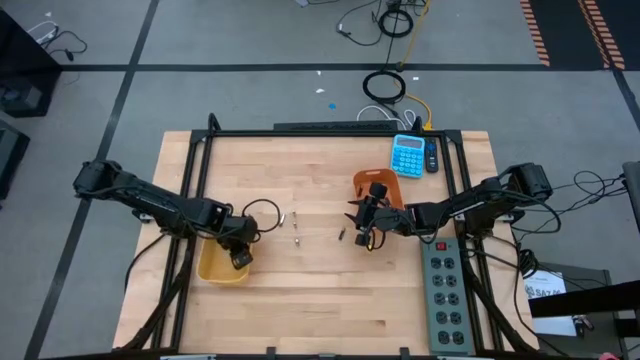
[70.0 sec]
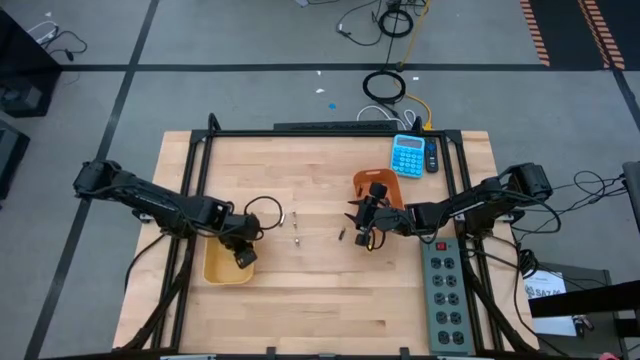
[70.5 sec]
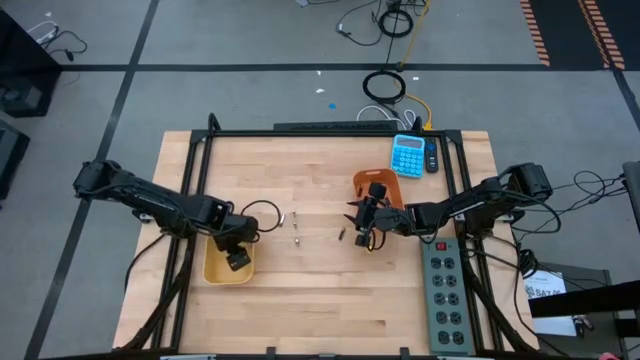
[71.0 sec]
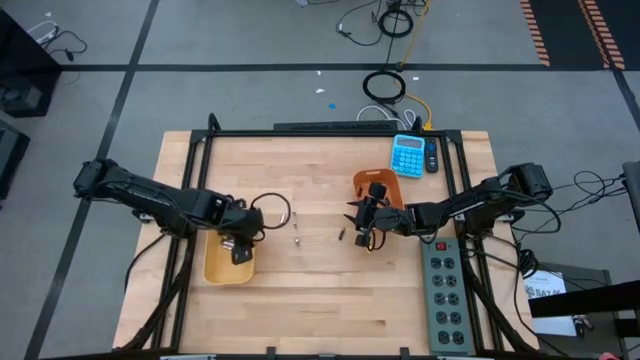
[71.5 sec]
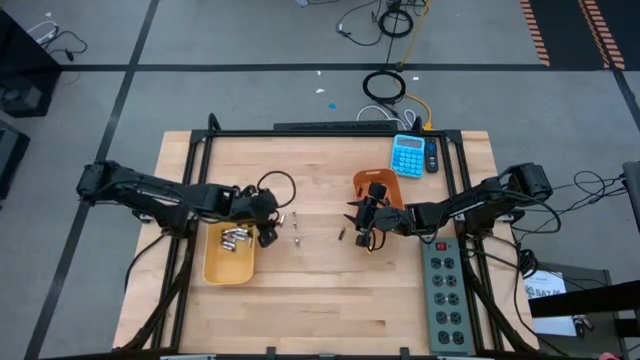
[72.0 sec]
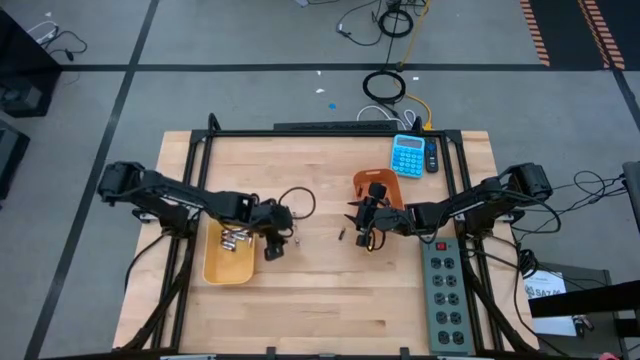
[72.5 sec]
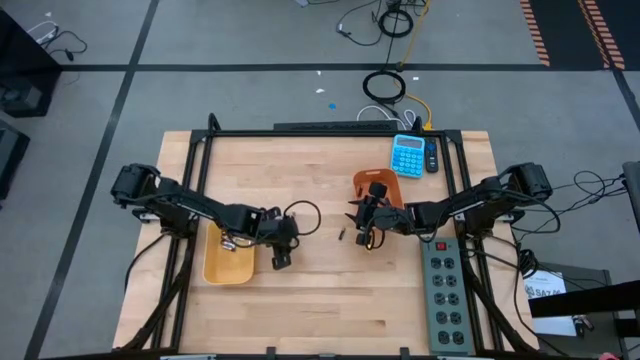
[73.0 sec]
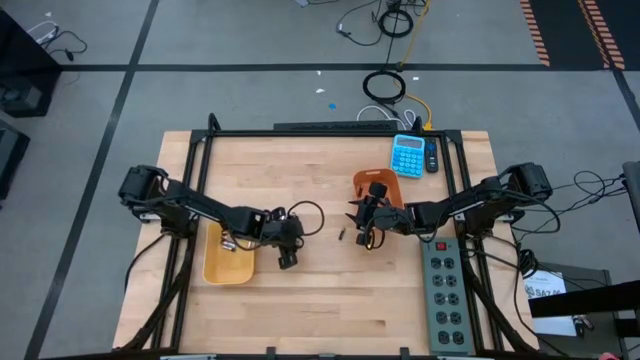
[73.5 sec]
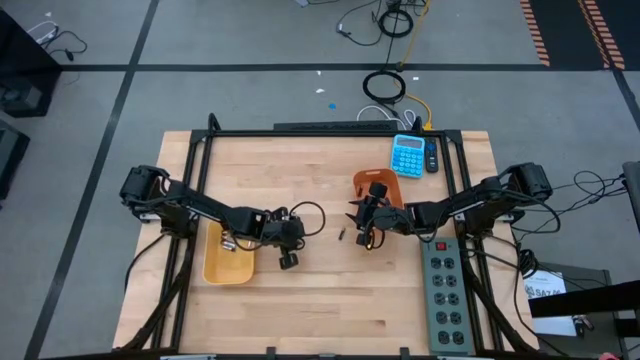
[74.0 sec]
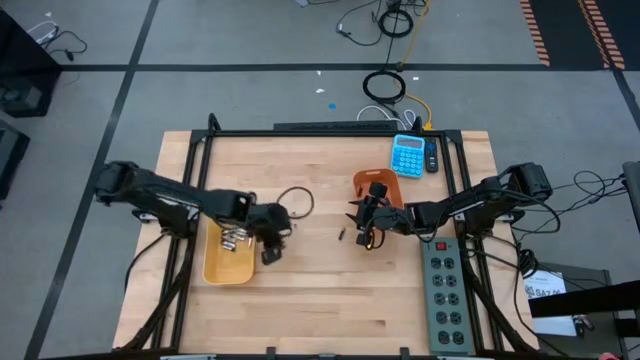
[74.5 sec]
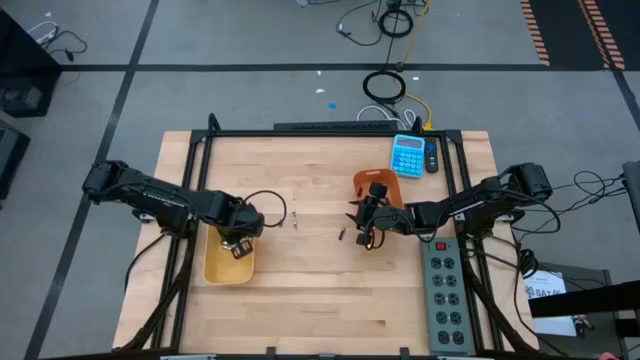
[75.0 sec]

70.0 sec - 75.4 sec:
Task: Sort batteries
Put the silver black battery into the yellow bin

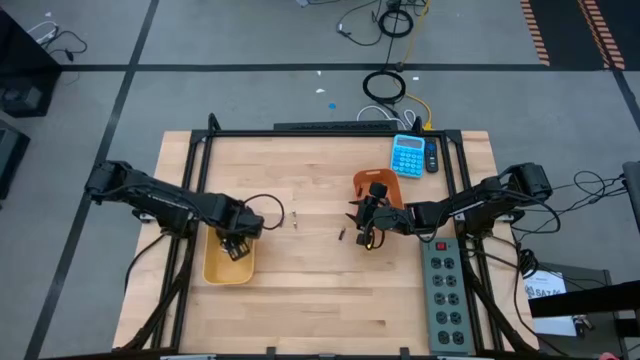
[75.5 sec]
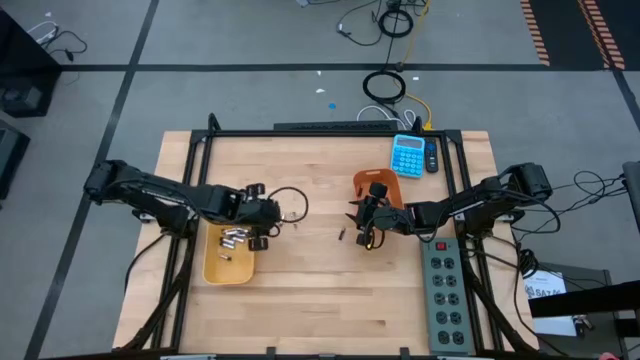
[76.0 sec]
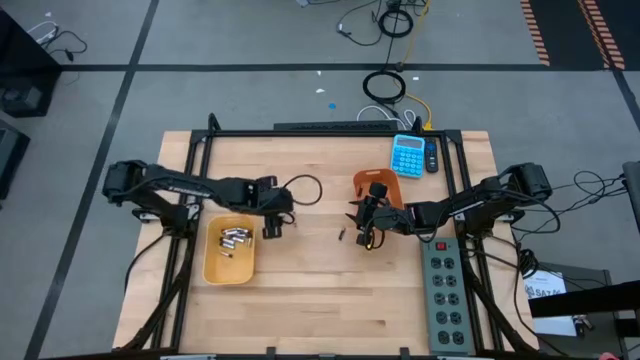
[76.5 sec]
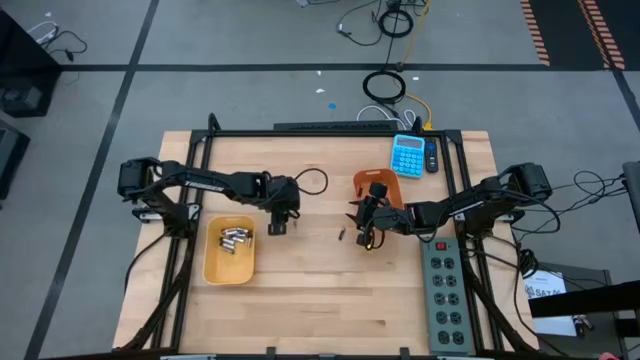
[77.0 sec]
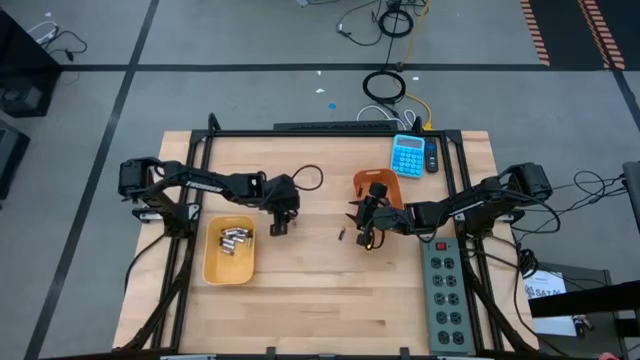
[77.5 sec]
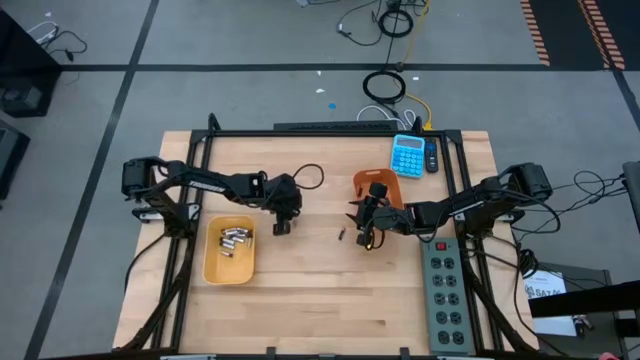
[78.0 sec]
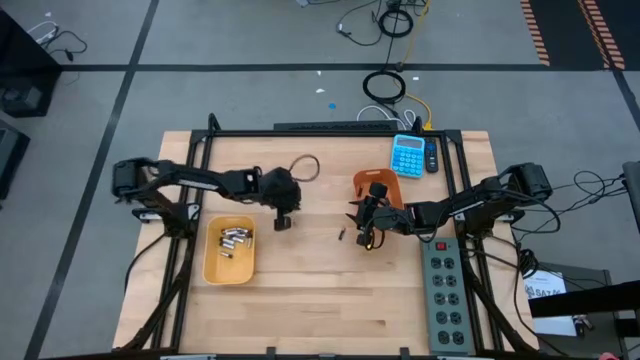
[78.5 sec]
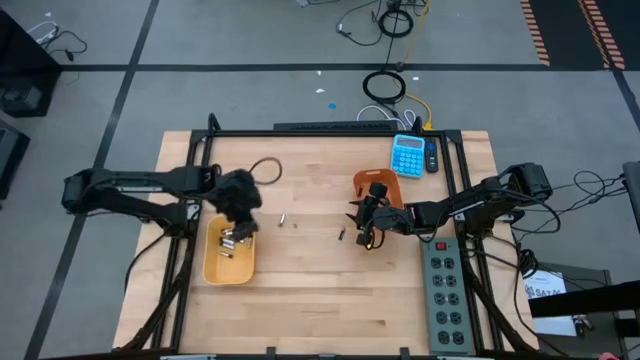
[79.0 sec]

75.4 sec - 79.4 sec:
Put the silver black battery into the yellow bin

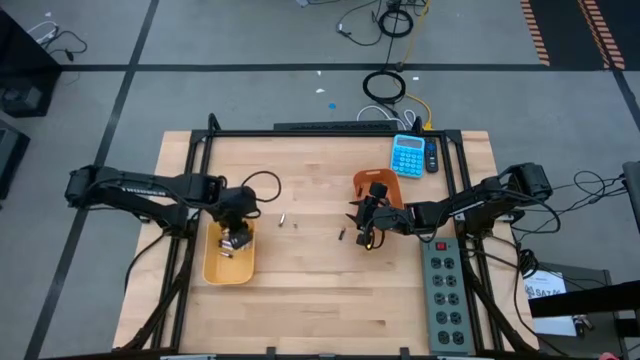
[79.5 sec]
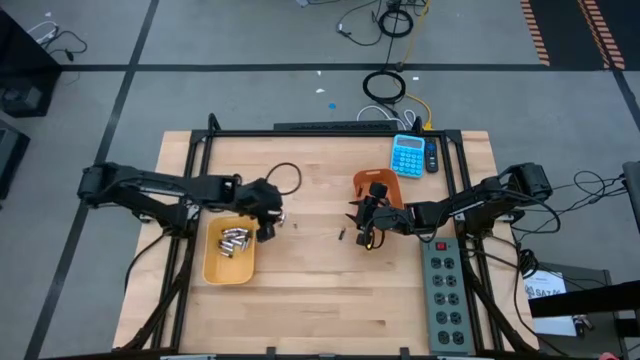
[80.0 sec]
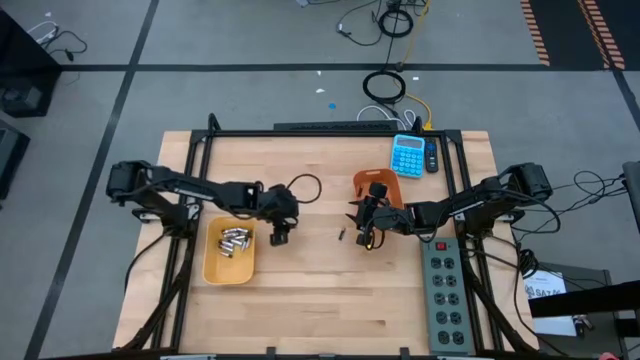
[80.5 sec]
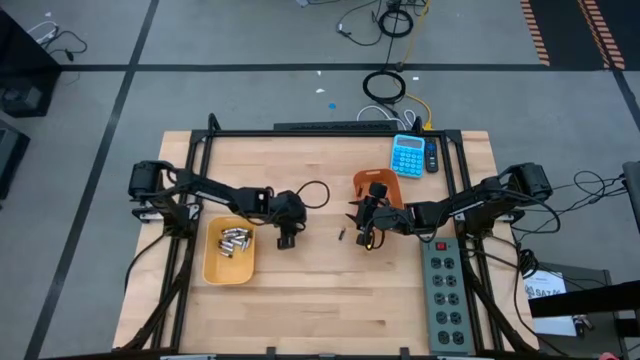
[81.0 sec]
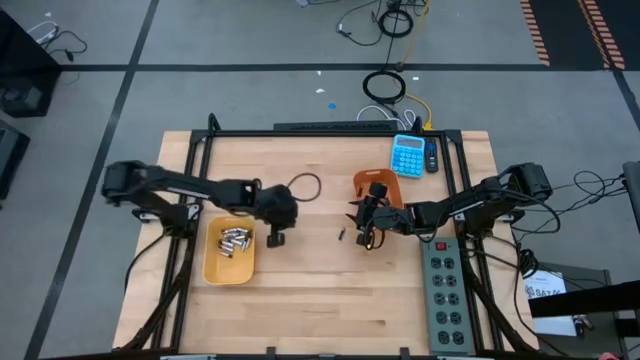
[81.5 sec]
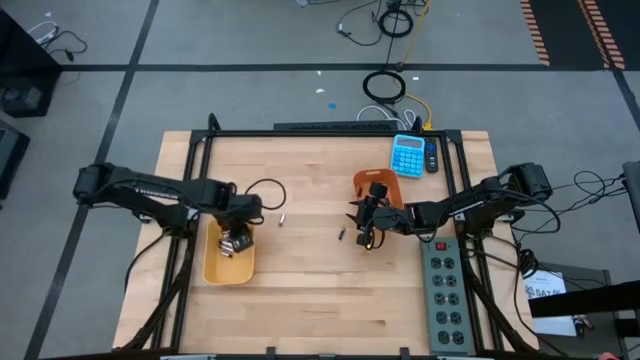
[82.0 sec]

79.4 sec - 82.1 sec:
Put the silver black battery into the yellow bin

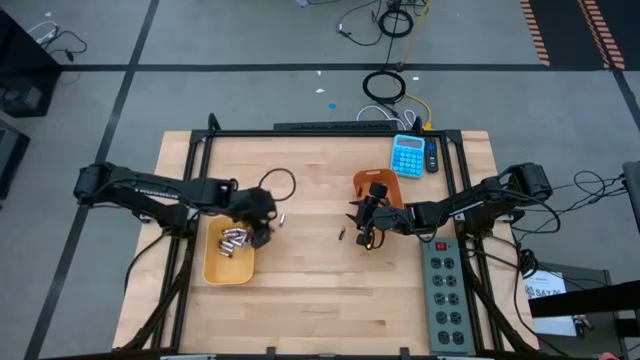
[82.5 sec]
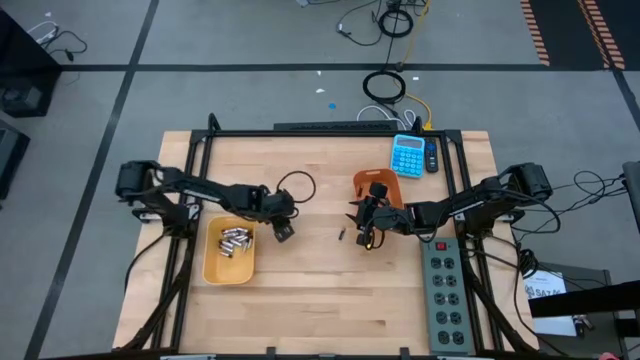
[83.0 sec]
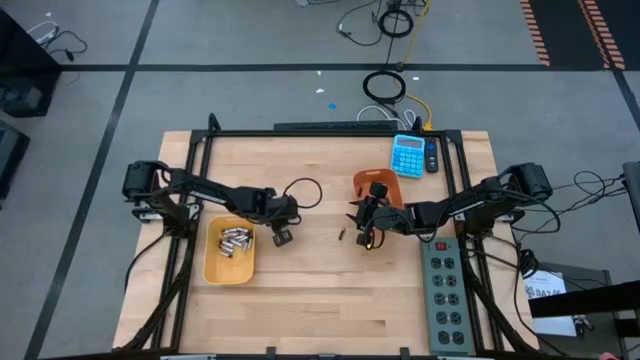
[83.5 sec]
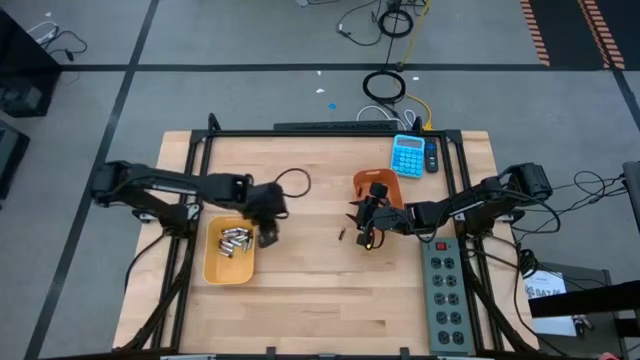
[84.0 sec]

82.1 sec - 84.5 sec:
Put the silver black battery into the yellow bin

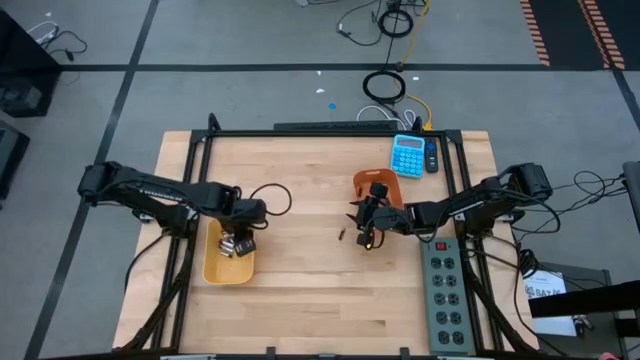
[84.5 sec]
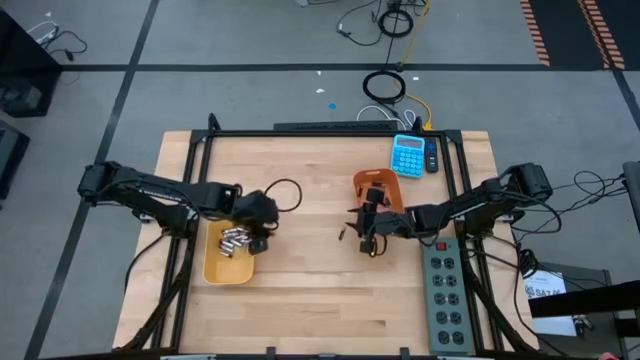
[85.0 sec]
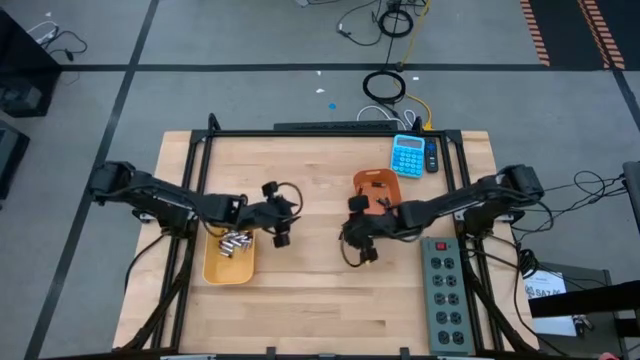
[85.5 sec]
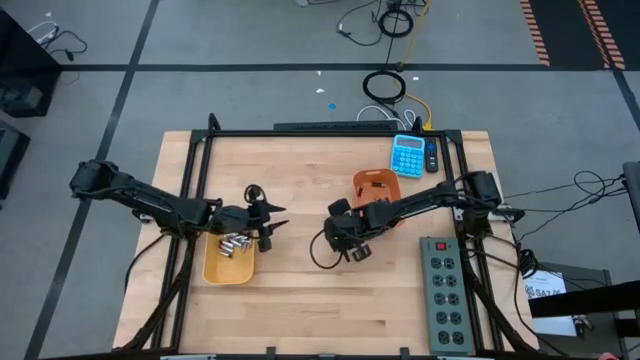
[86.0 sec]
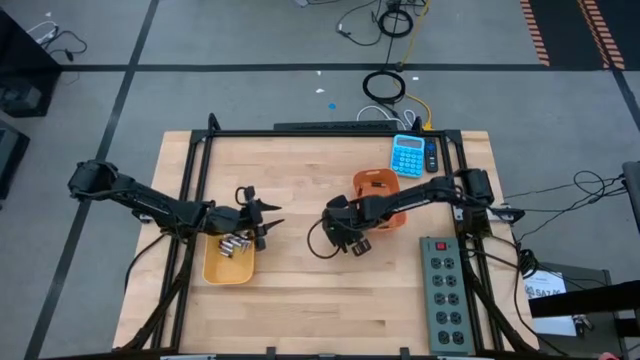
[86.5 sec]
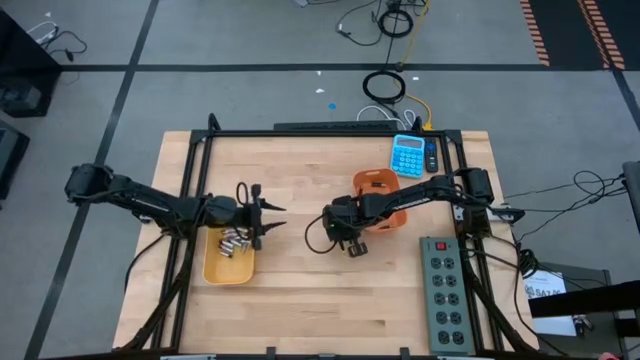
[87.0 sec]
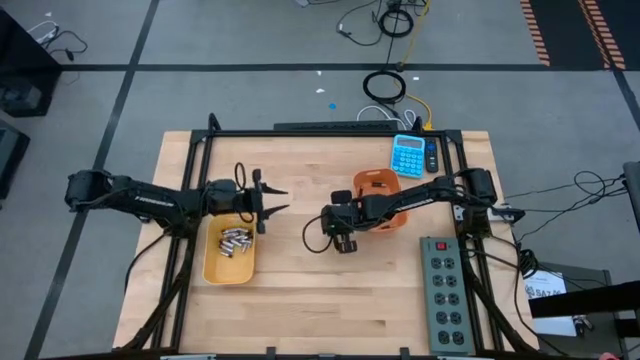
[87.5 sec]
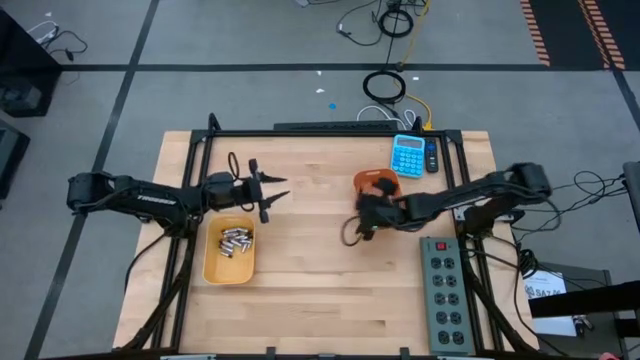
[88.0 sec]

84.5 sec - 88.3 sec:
Put the black brown battery into the orange bin

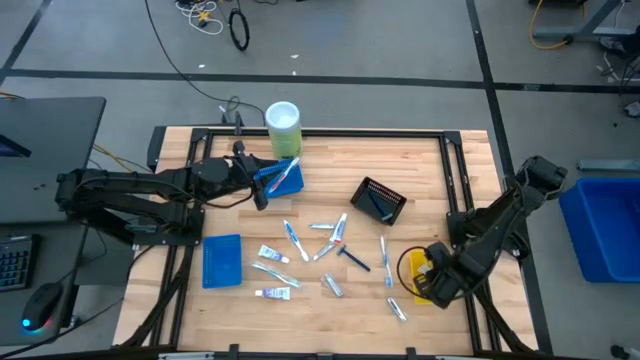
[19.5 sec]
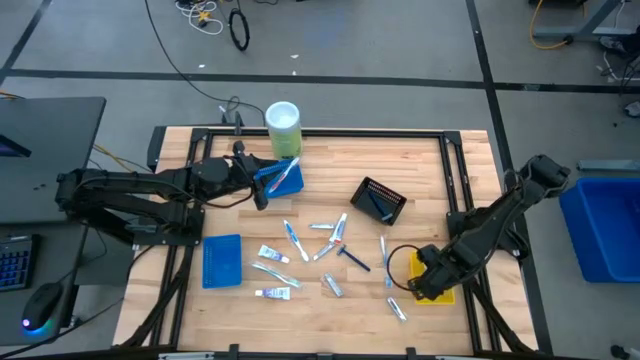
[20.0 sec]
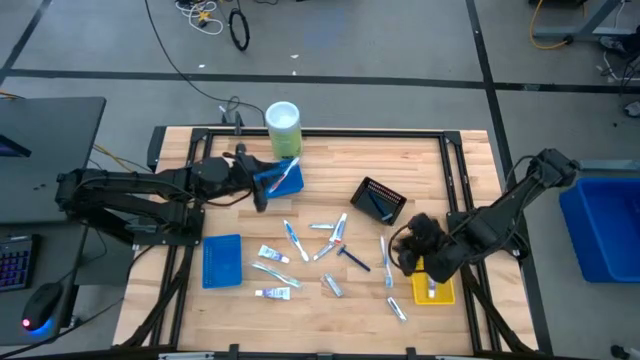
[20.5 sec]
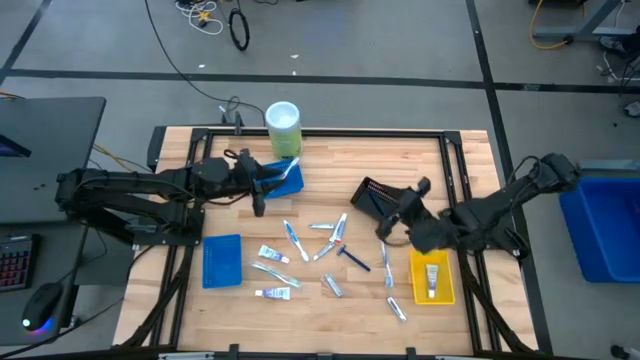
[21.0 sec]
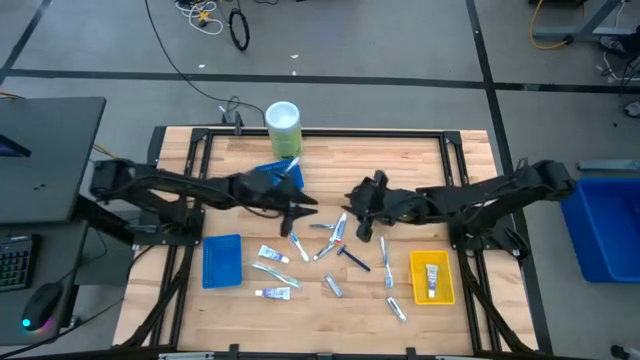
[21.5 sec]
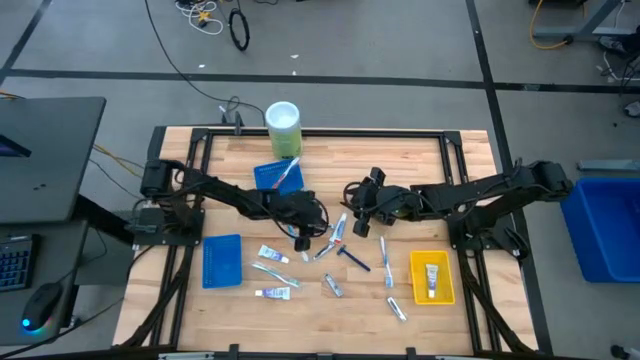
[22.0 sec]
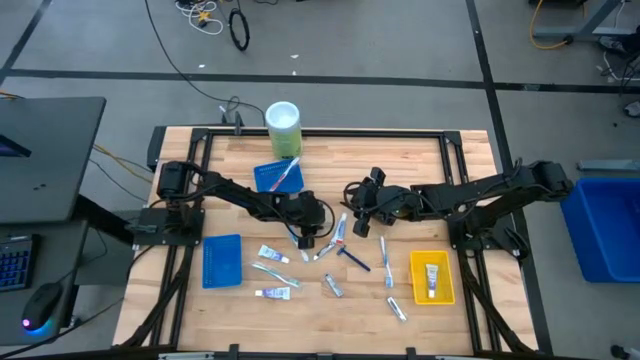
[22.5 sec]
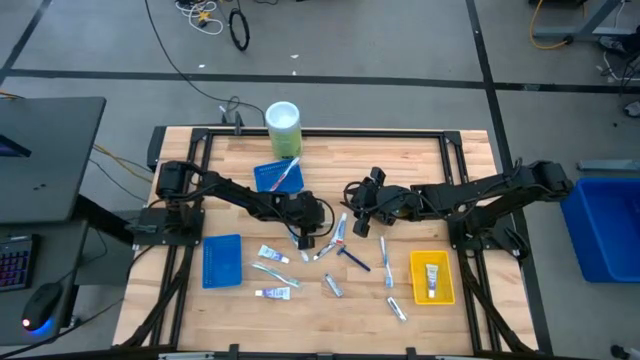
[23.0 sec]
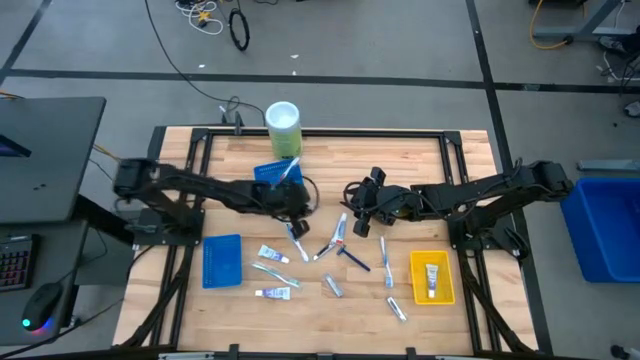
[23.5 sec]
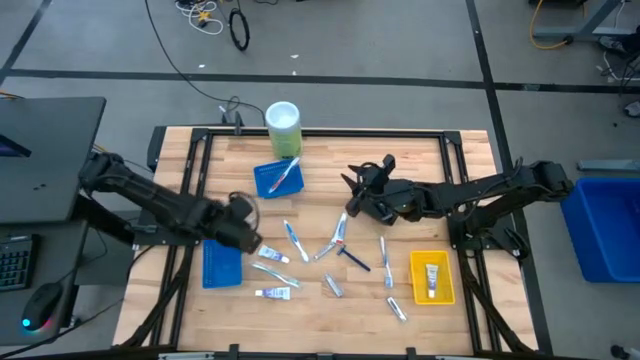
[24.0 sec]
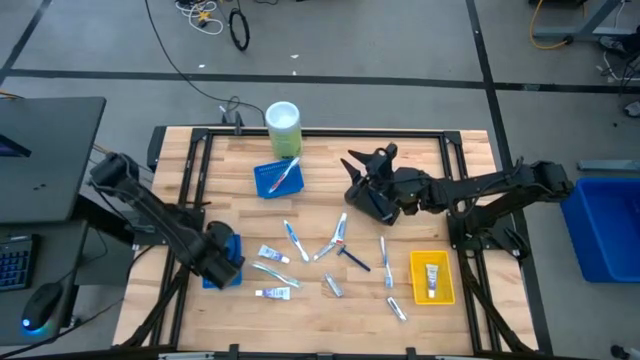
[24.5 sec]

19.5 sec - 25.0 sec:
Task: Pick & Place Travel size toiletries
Put the silver nail cutter into the bottom blue bin
